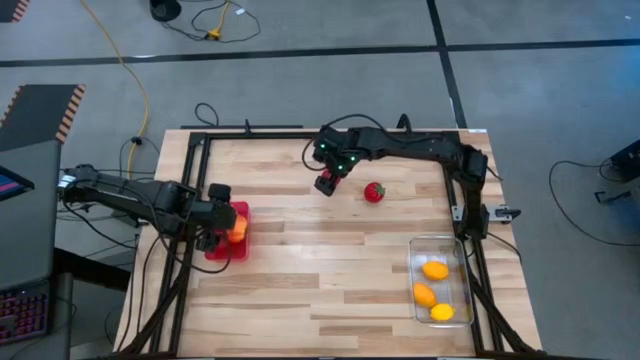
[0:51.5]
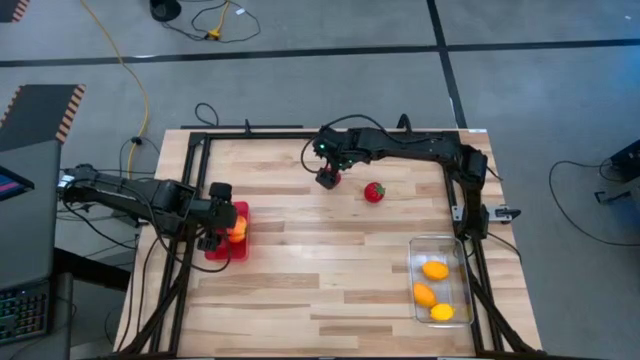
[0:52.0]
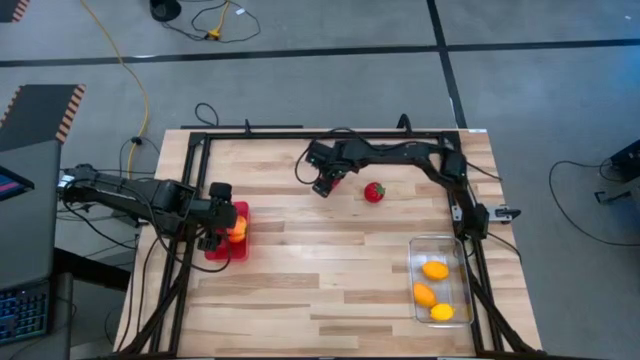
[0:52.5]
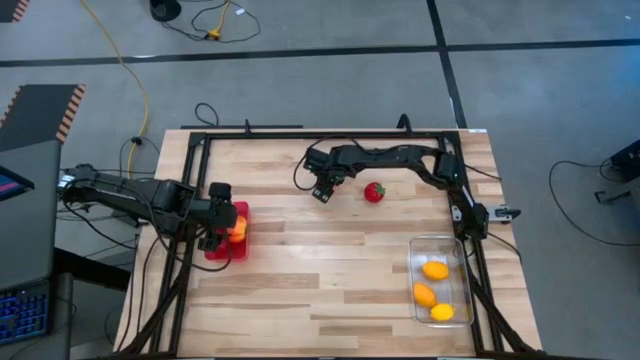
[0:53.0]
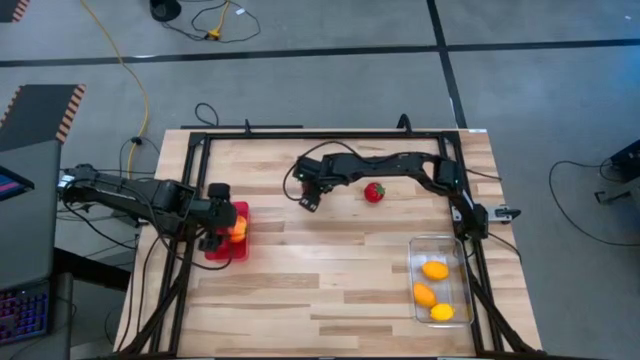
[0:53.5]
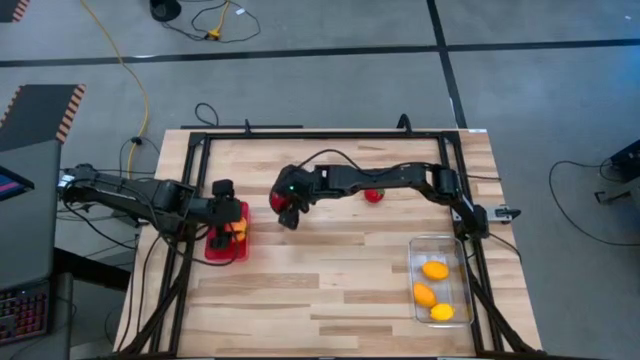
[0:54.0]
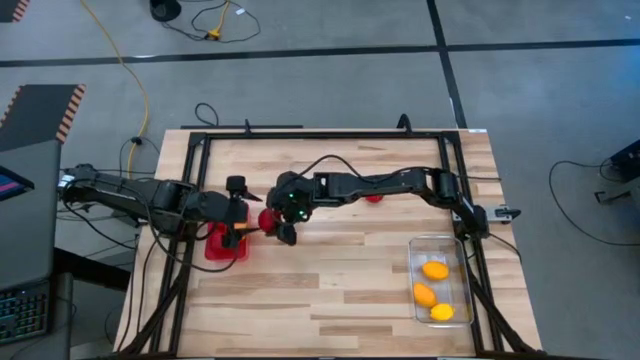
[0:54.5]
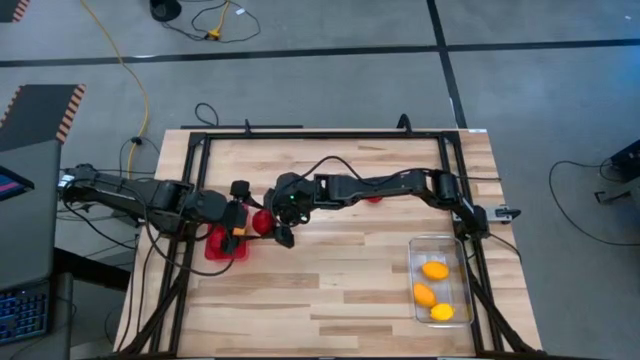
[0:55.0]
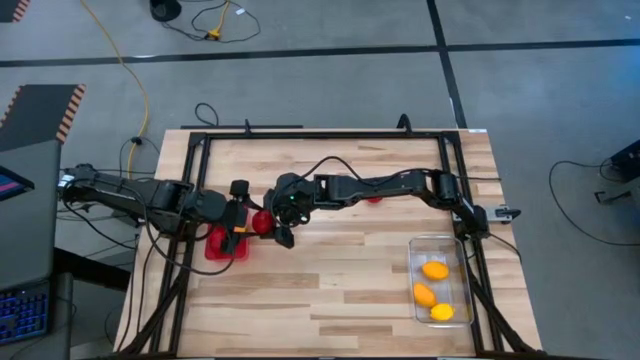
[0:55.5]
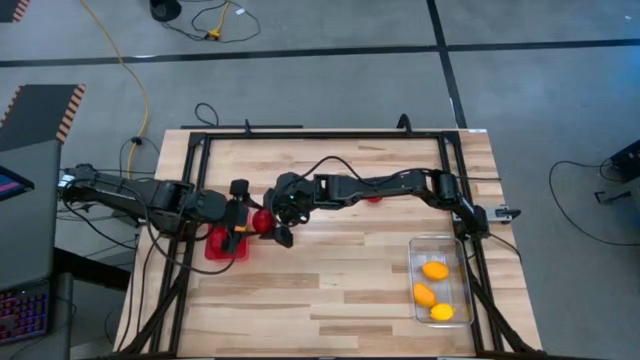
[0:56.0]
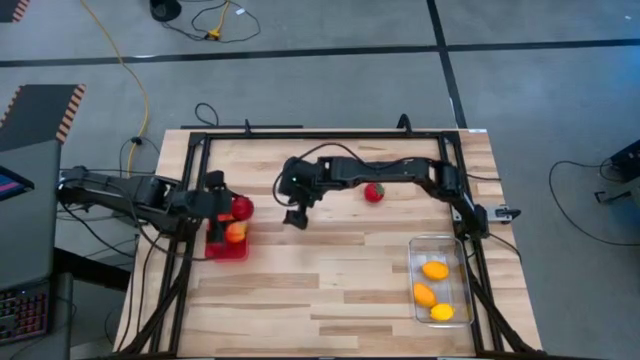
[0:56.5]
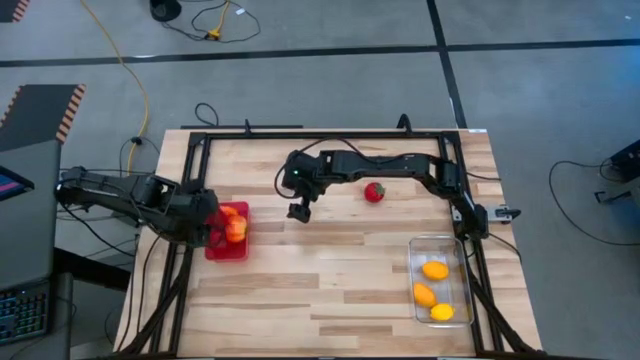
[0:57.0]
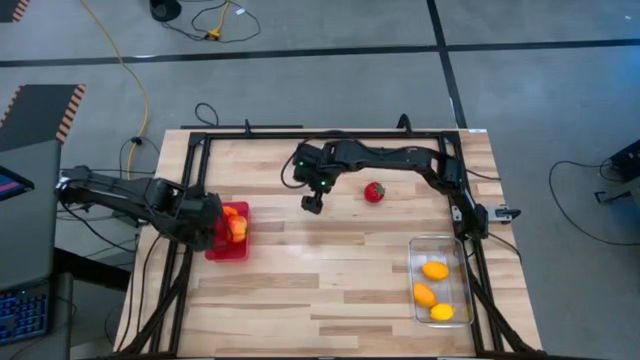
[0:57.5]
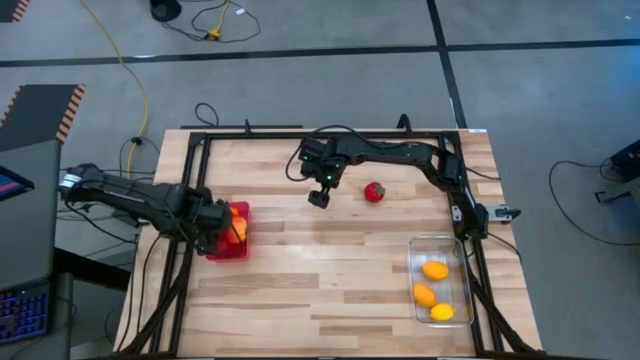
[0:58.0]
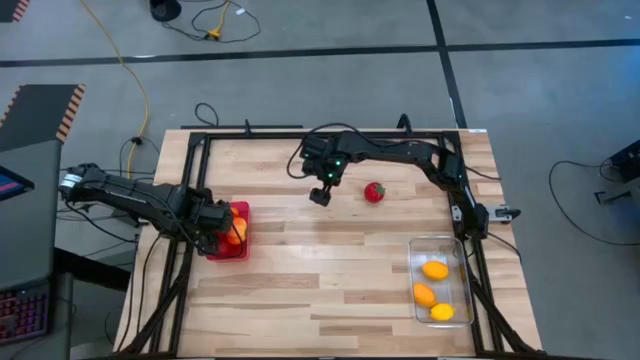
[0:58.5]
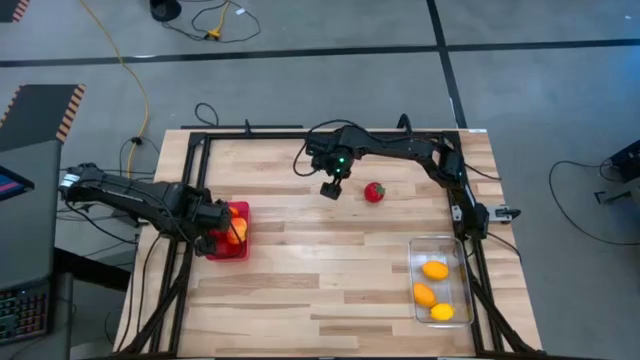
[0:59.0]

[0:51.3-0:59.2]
Task: Sort produce into baskets
Put the left red tomato into the red bin

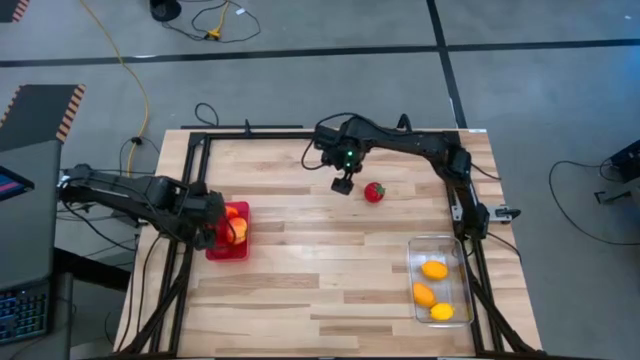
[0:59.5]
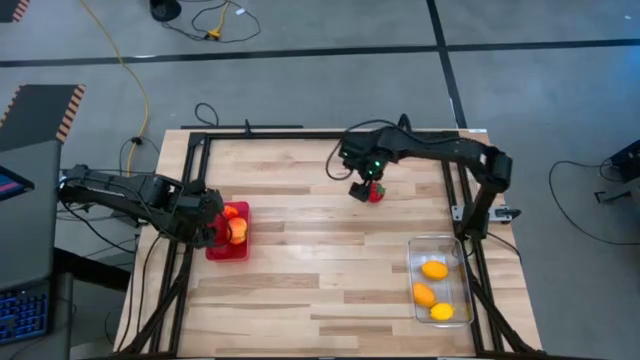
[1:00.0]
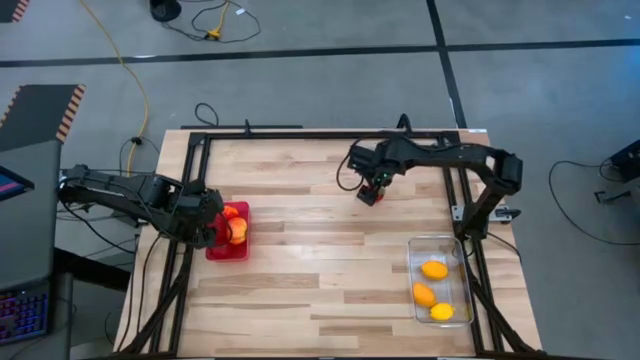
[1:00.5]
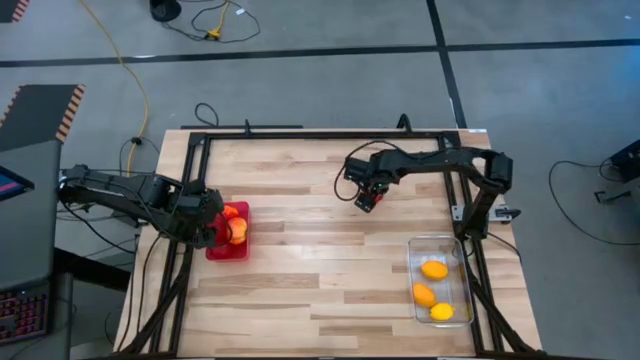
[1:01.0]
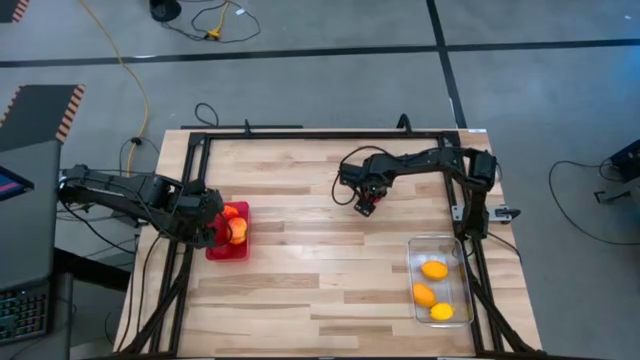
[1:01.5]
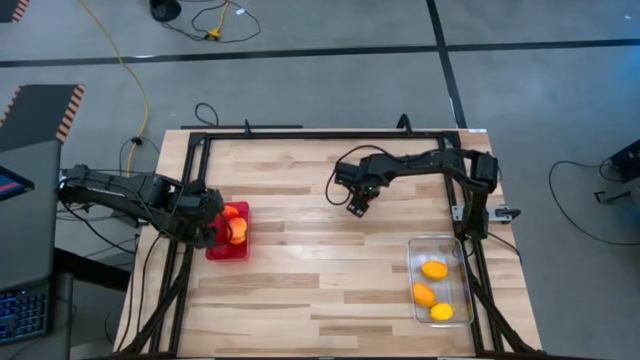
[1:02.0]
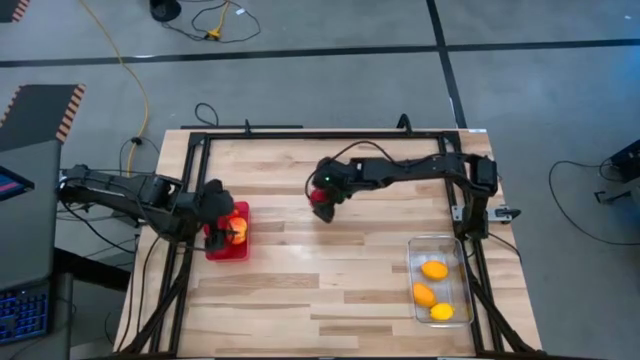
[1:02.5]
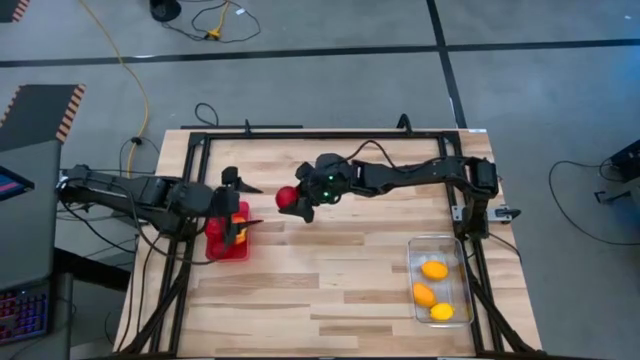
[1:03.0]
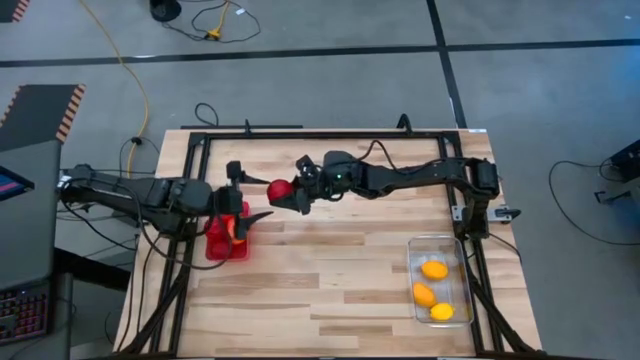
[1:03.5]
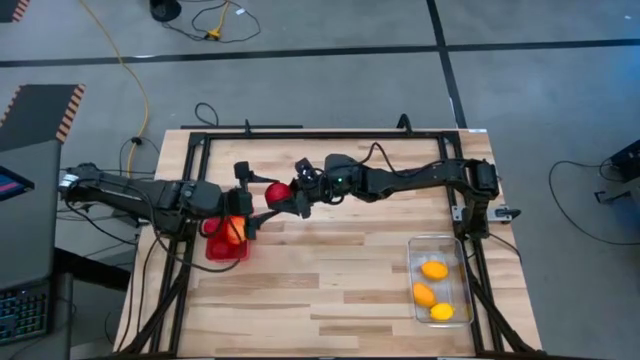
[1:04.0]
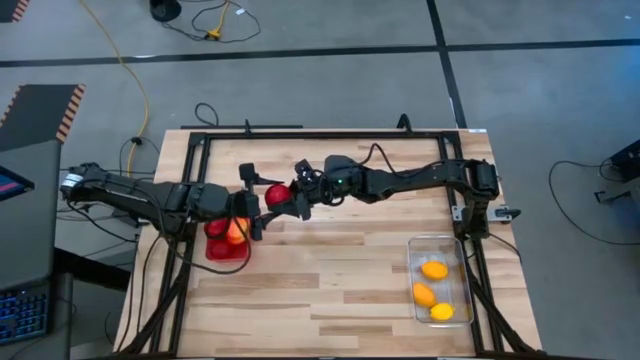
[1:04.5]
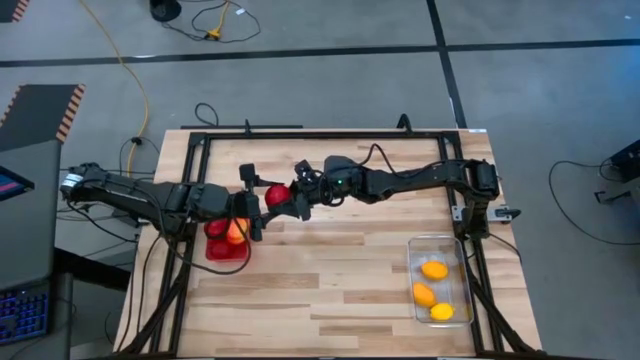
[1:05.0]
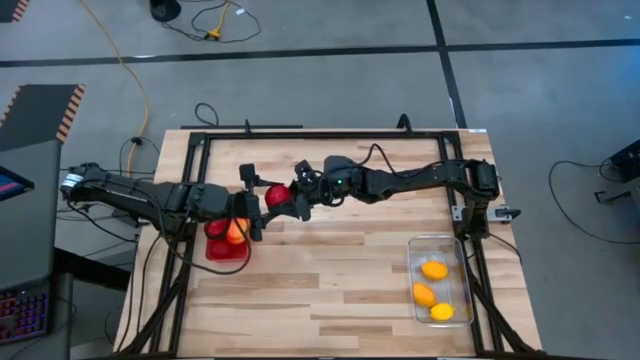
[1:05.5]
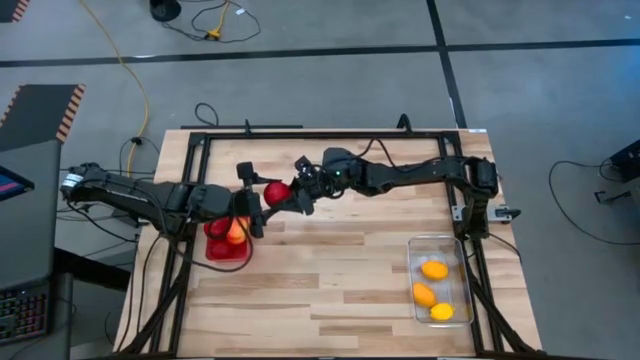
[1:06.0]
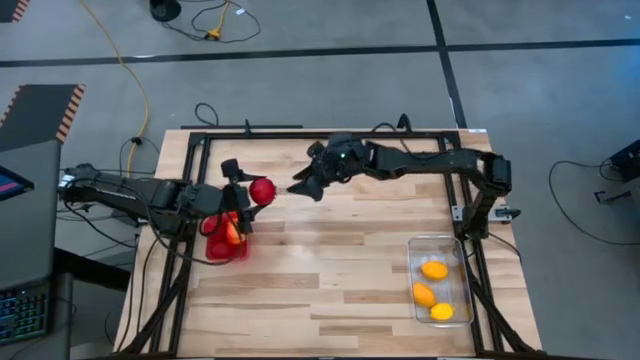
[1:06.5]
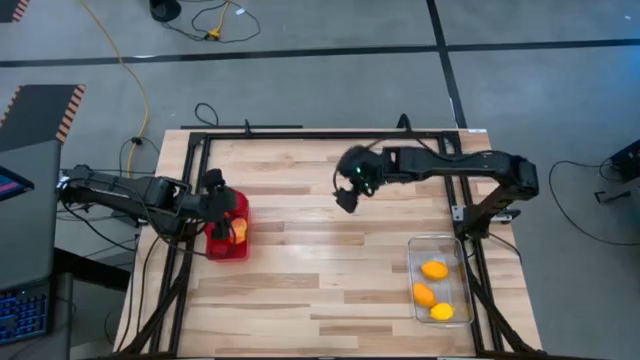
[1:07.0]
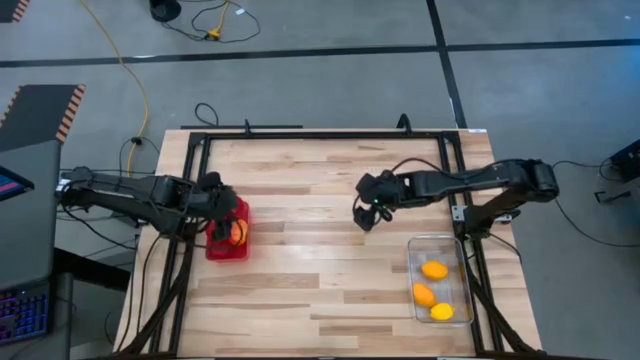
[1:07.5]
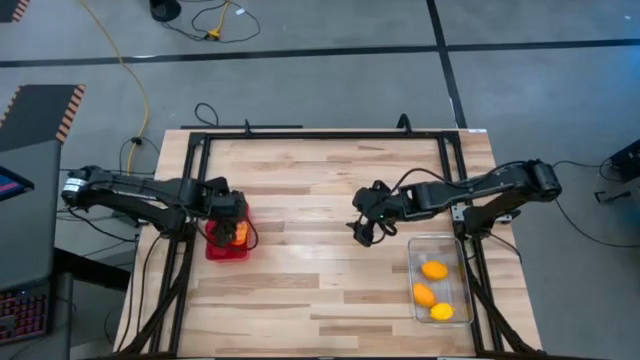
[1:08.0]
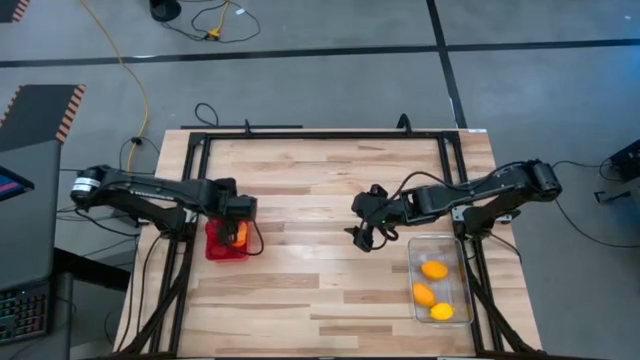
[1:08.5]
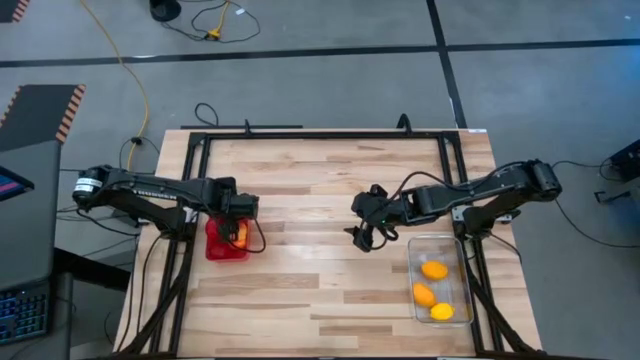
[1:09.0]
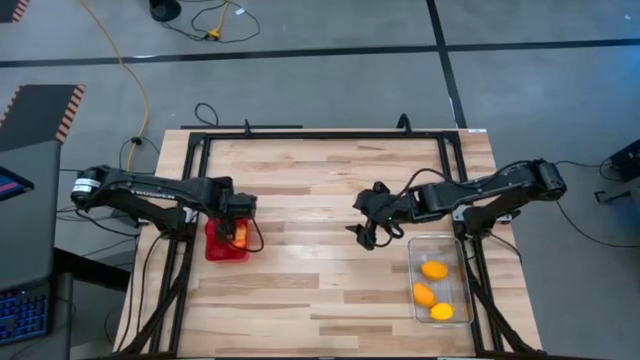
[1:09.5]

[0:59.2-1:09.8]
Put the red tomato into the red bin

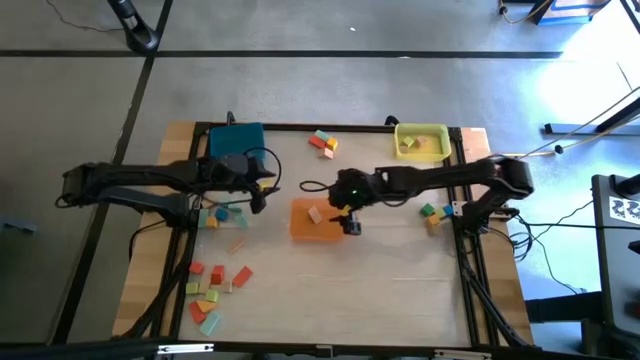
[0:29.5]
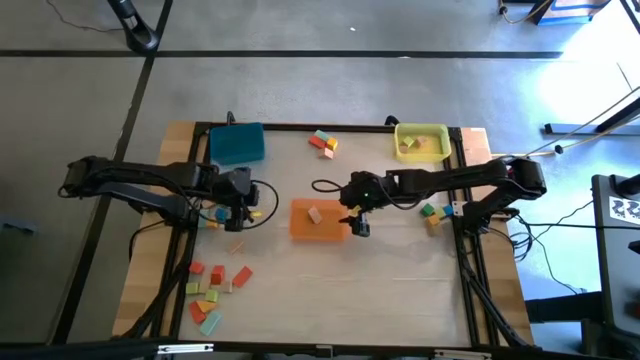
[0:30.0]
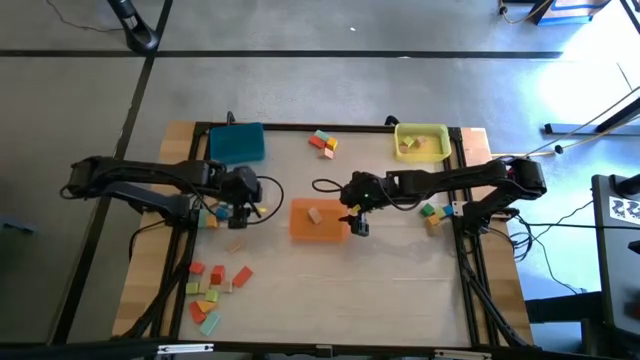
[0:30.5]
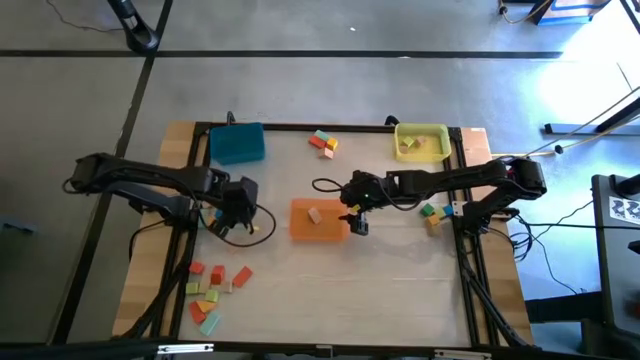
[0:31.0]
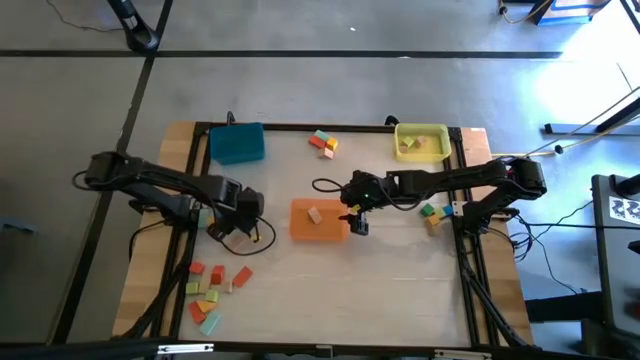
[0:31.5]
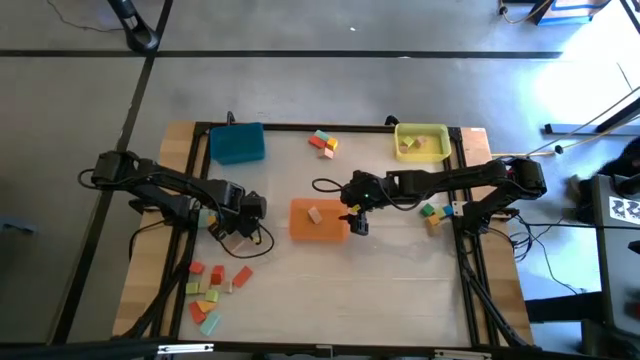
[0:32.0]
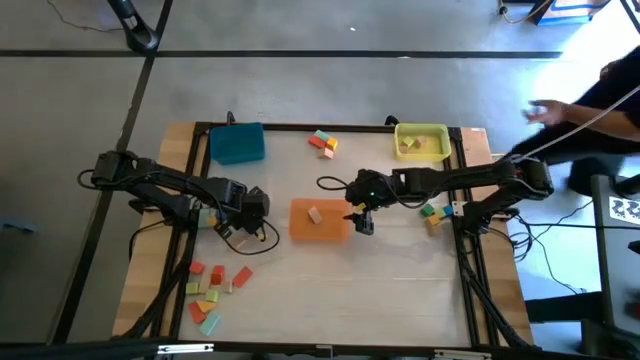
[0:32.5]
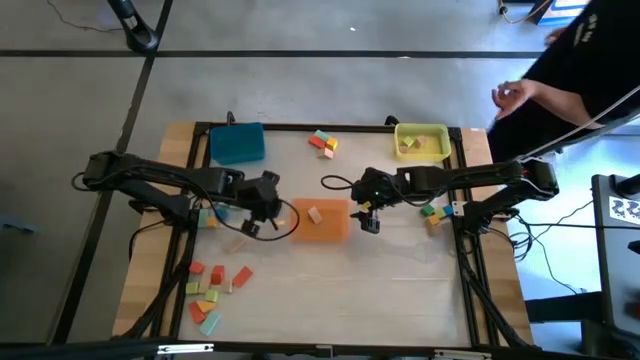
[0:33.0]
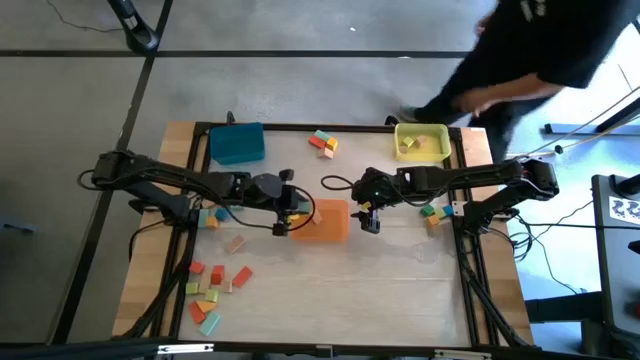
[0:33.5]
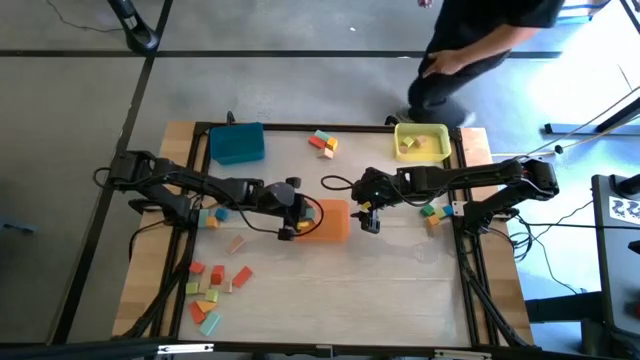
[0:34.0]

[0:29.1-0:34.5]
Task: Sort blocks by size
Put the blue triangular block into the orange bin
